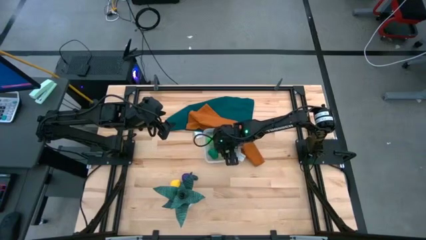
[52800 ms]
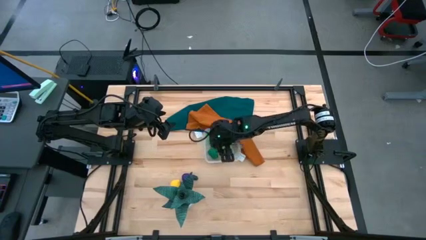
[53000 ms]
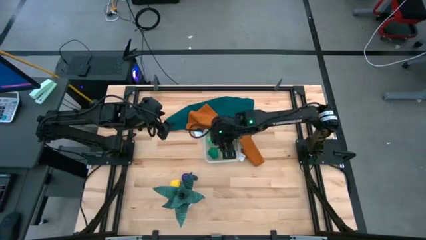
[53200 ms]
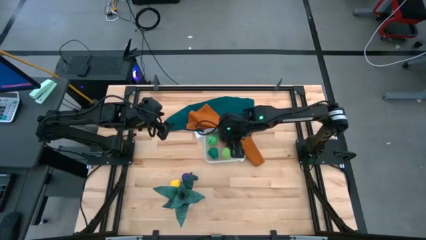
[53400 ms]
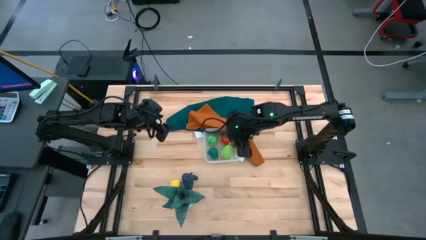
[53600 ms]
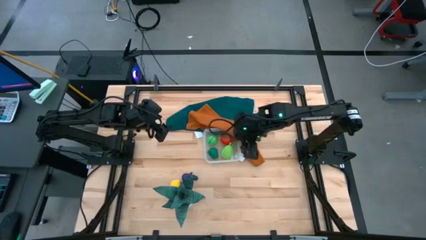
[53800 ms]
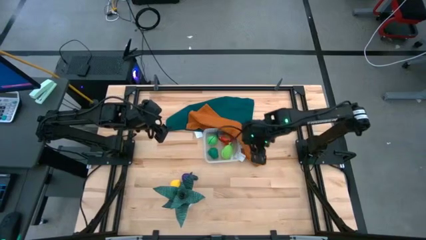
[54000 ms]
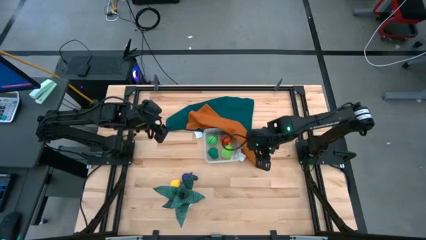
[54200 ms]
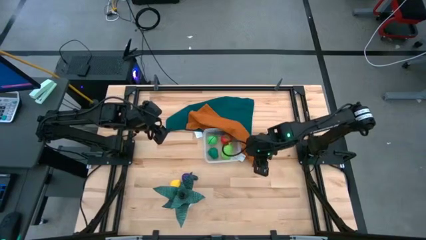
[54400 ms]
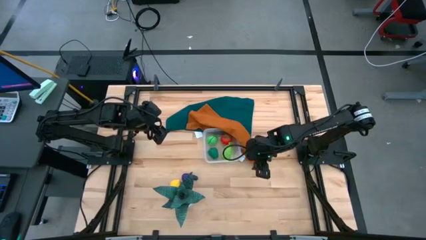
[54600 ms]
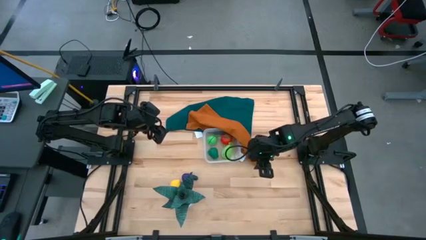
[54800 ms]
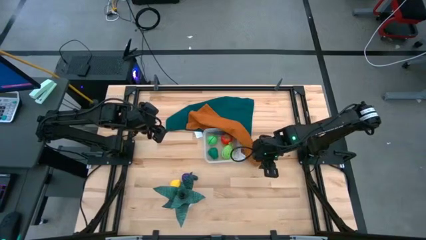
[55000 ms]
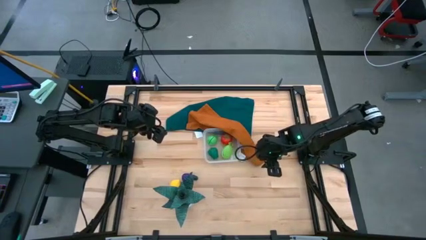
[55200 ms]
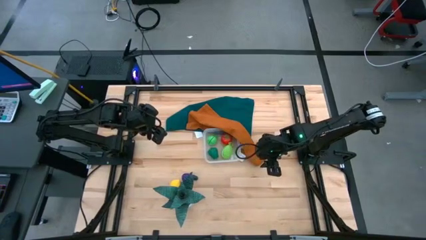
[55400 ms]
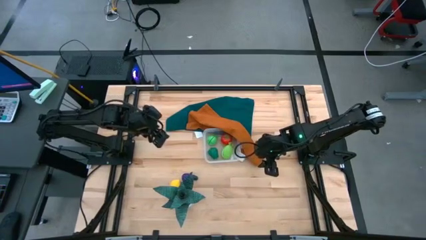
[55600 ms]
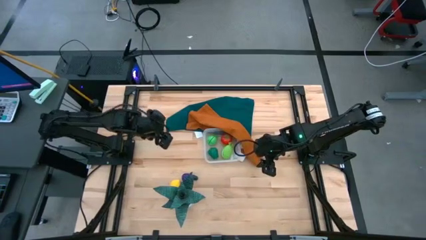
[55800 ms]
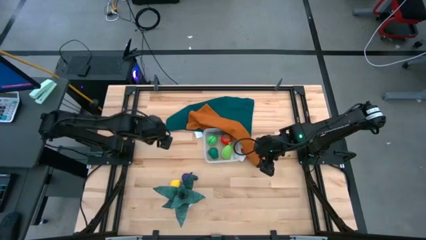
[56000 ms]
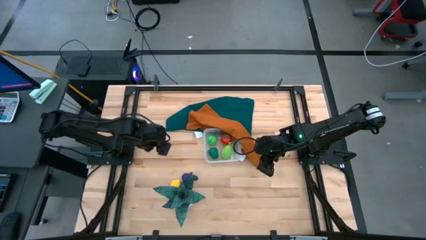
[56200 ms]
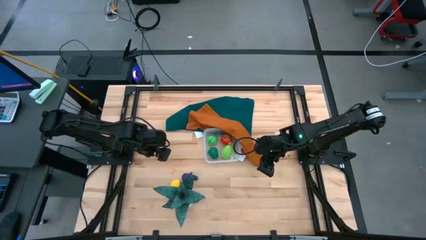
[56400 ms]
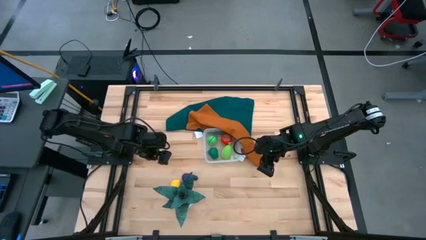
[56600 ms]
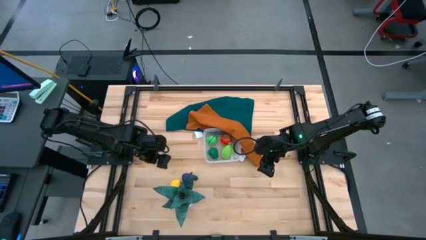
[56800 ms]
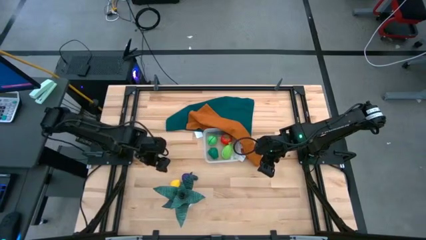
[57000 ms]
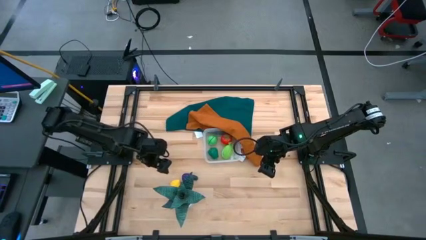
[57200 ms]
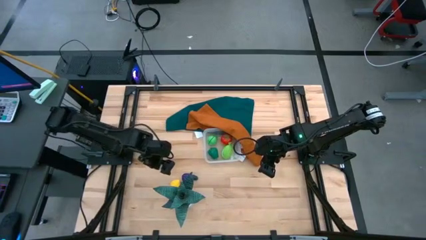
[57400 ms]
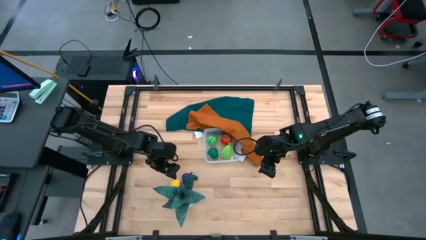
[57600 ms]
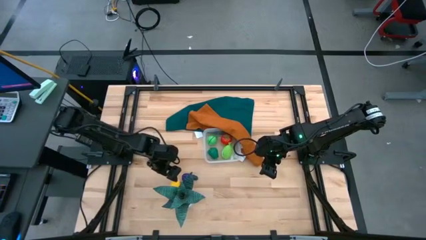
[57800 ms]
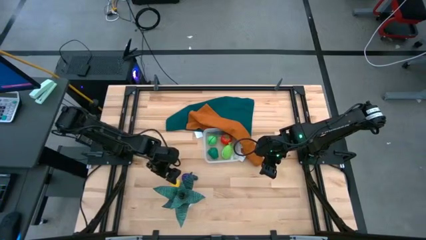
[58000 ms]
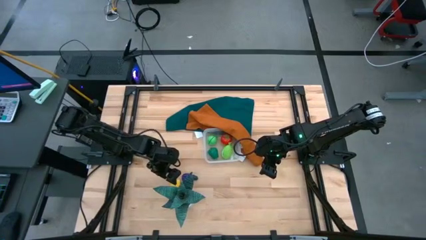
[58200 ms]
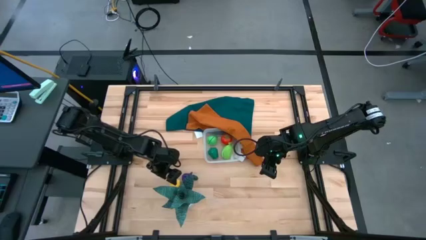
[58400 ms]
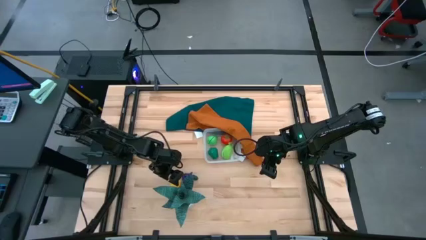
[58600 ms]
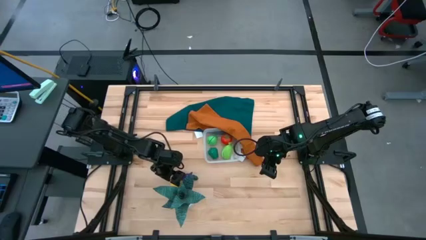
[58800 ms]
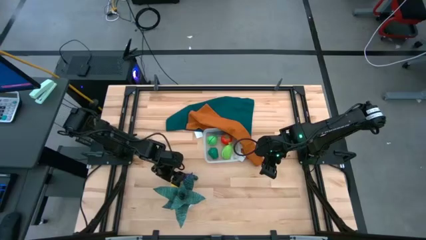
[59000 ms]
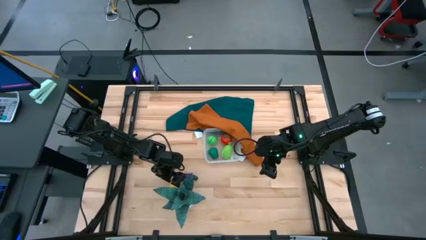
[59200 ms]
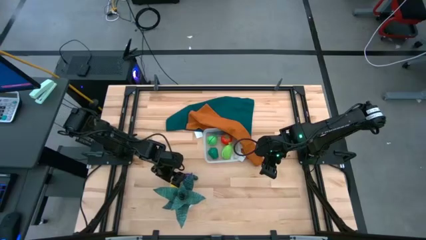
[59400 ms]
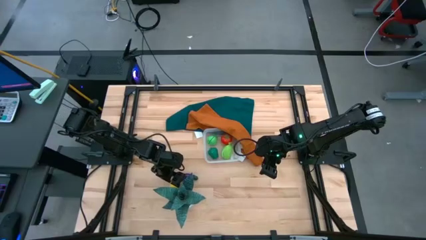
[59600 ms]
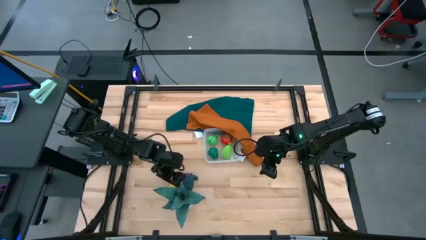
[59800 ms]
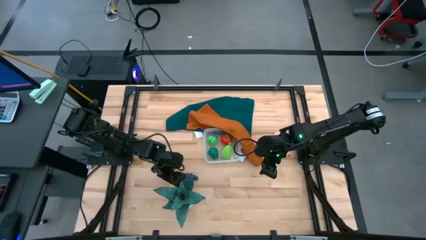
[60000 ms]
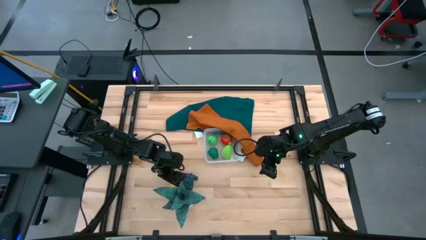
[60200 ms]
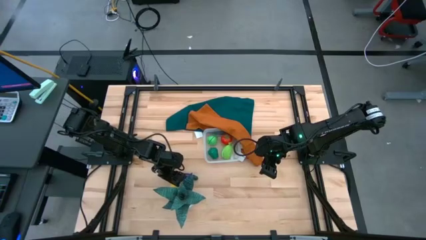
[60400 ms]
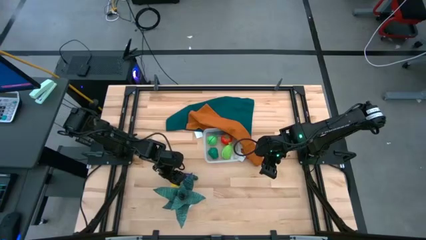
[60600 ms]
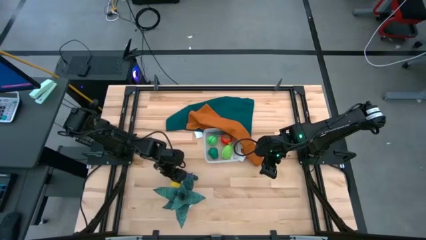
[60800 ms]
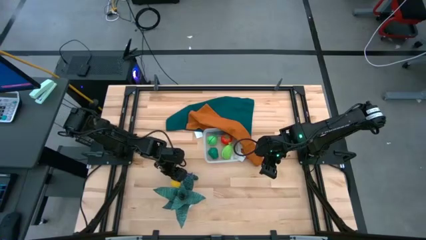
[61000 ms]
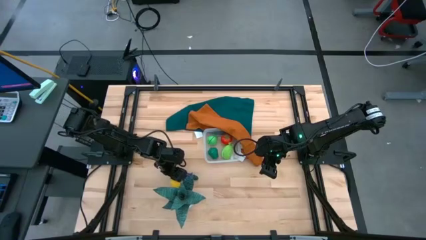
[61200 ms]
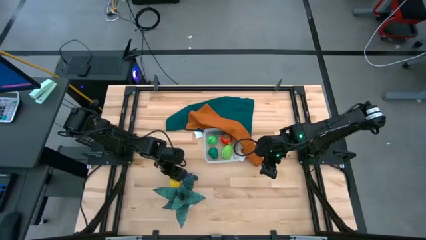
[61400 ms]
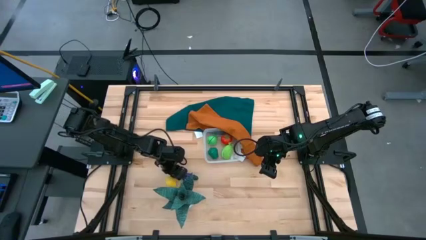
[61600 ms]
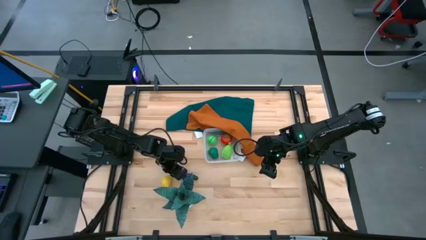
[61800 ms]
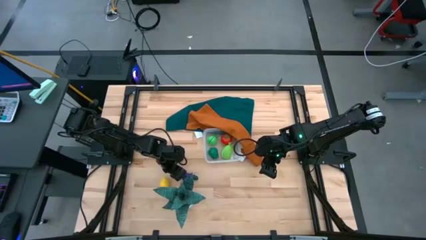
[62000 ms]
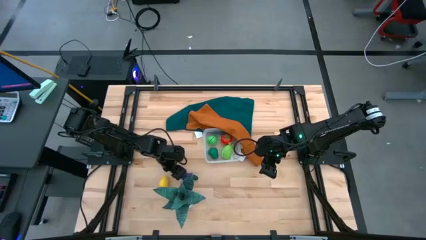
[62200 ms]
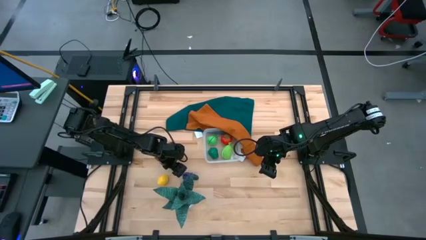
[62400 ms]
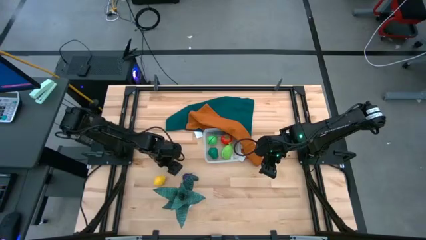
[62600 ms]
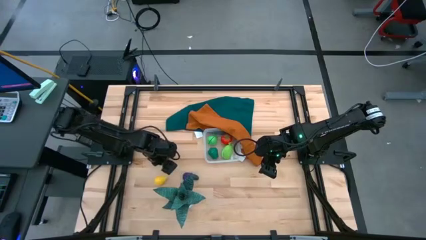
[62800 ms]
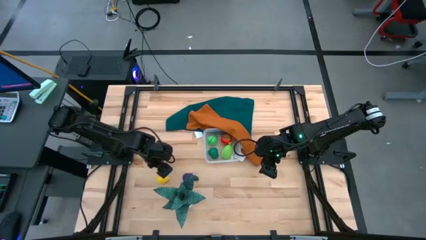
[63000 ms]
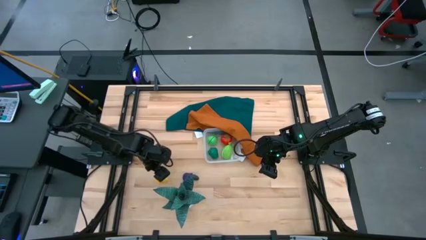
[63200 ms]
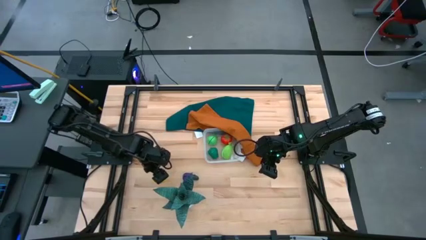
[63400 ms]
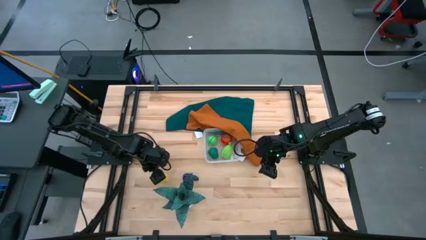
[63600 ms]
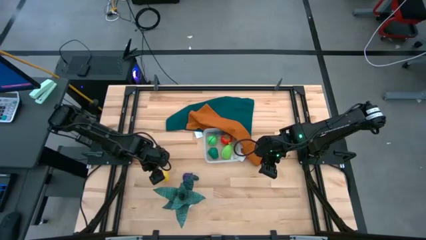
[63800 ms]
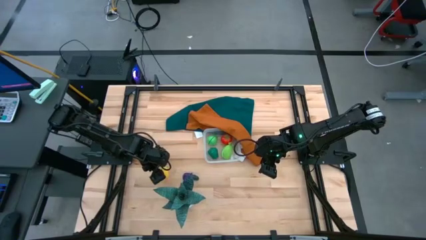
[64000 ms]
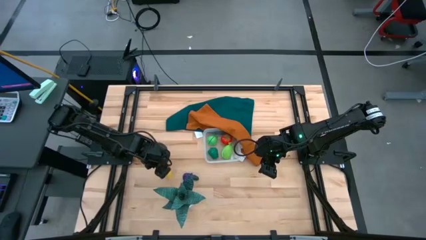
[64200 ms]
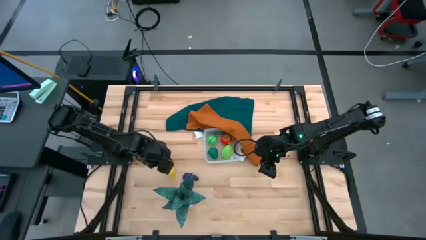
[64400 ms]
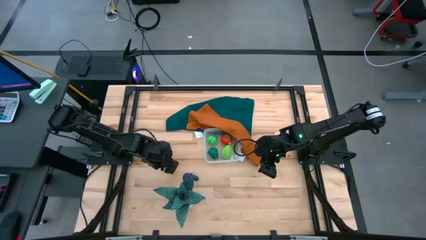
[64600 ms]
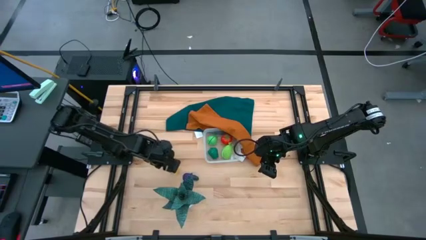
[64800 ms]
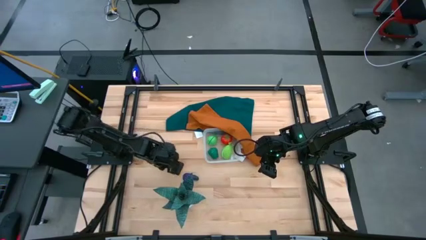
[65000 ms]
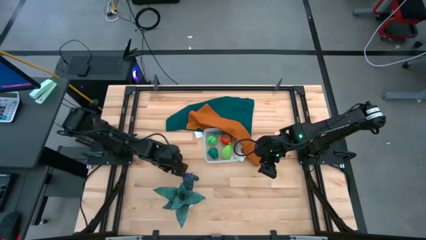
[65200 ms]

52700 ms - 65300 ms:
Task: Pick and placing Produce into tupperware
Put the lemon into the transparent bin

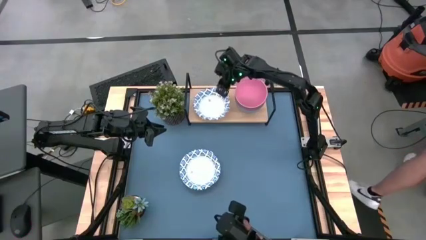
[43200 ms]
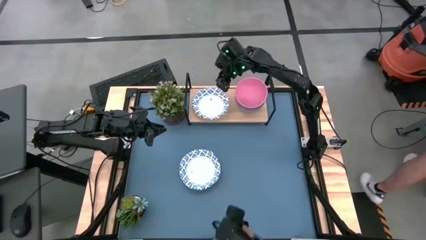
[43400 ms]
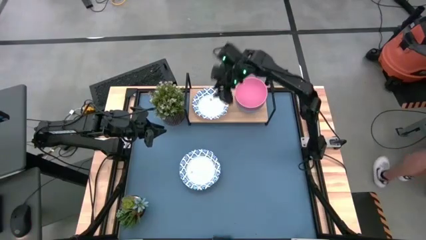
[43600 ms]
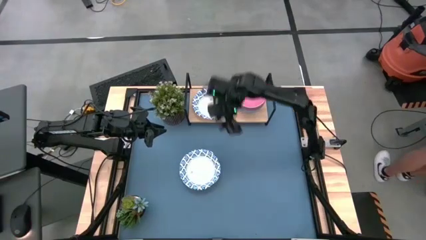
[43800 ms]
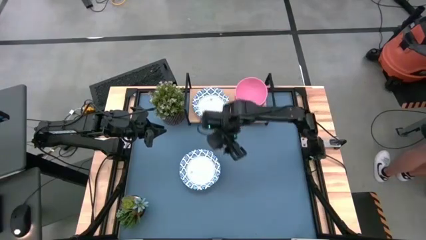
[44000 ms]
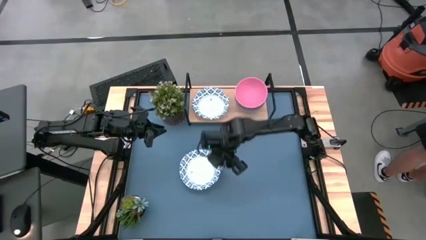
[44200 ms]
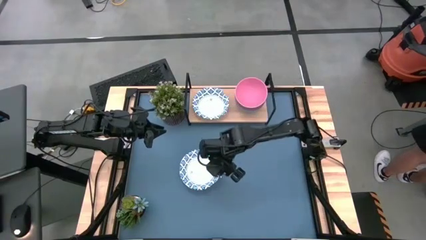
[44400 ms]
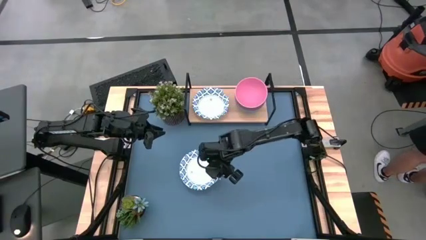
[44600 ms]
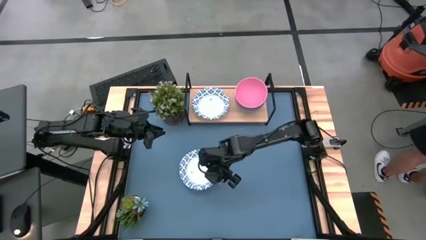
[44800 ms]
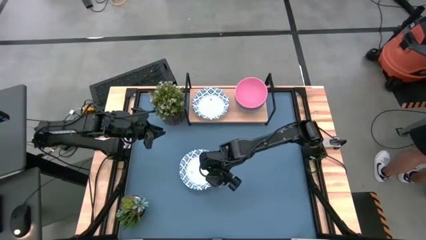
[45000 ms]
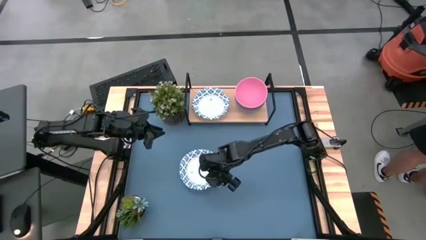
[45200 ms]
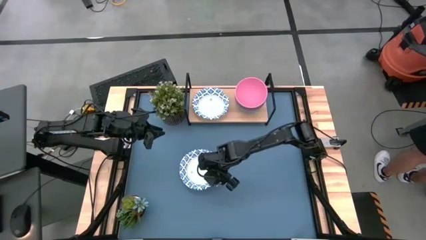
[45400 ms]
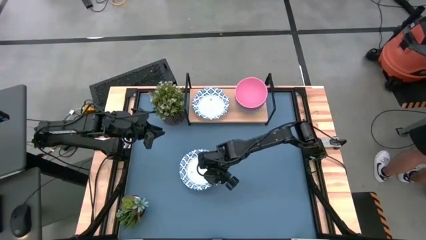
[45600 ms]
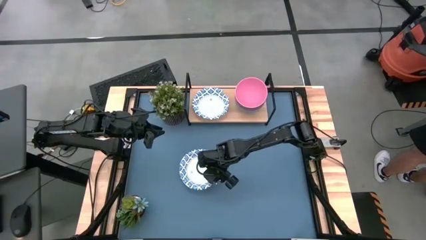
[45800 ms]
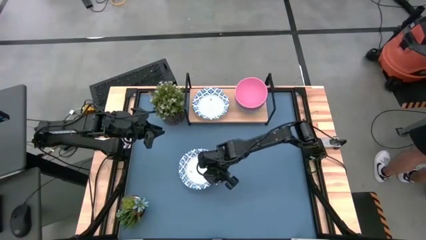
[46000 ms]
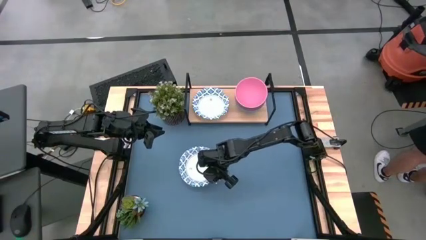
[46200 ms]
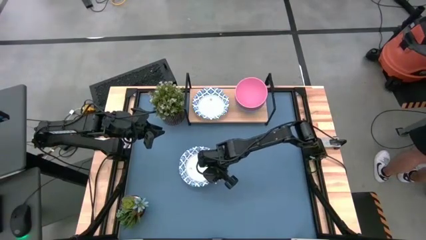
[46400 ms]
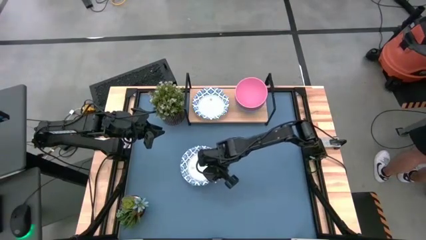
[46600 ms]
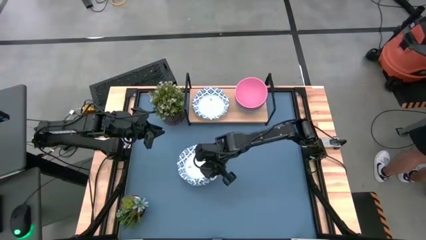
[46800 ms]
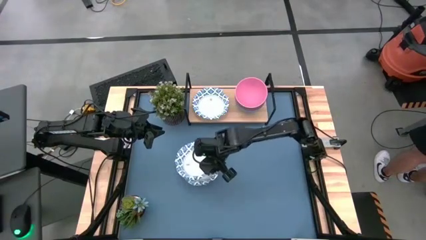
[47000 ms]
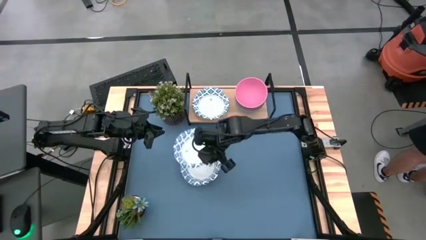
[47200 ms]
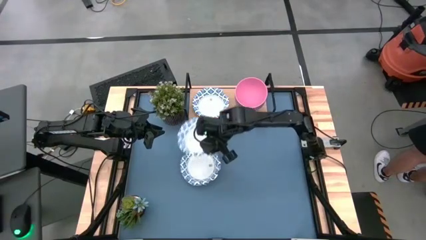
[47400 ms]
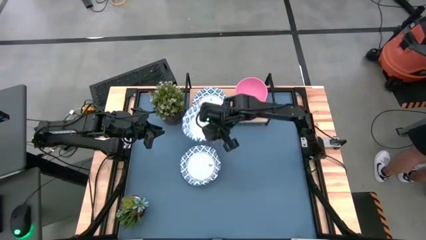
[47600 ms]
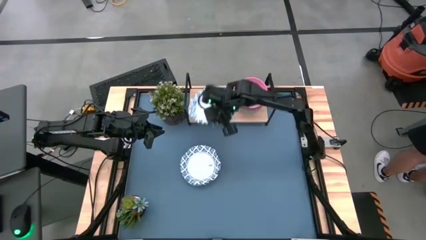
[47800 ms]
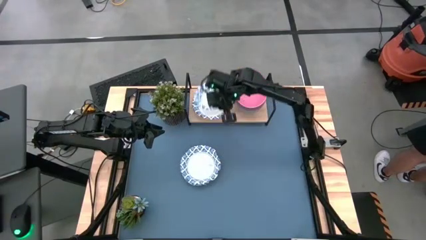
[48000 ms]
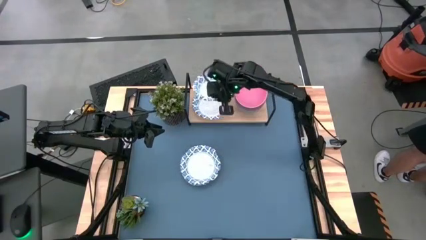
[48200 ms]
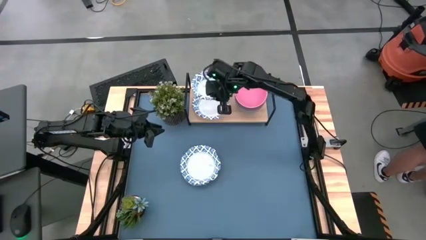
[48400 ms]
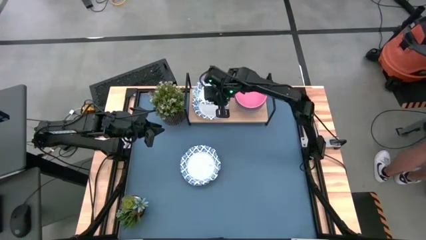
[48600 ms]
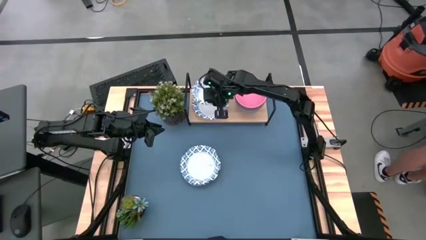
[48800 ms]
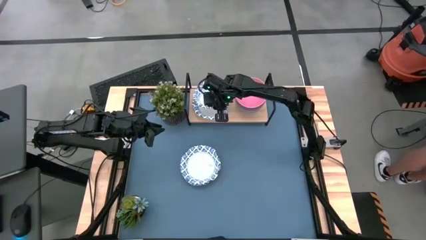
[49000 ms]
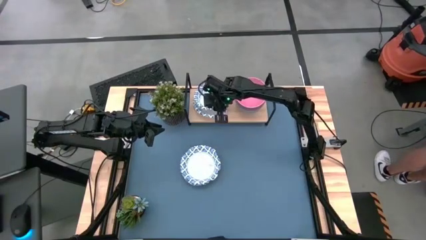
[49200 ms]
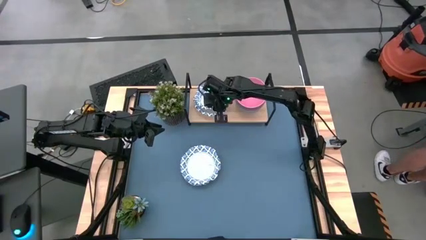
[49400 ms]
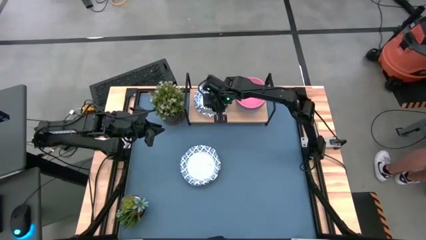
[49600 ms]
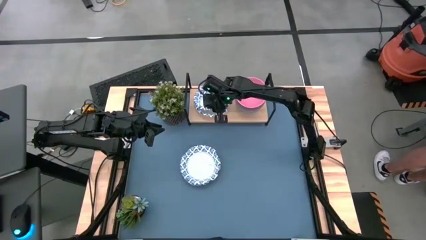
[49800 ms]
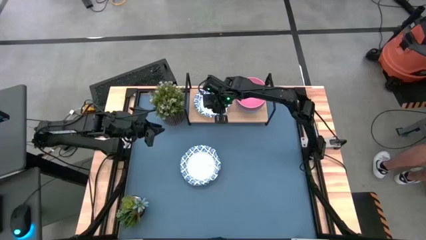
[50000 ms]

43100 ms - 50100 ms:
Task: Place and stack bowls onto a shelf
Stack the blue patterned bowl on top of the other blue patterned bowl on the shelf
